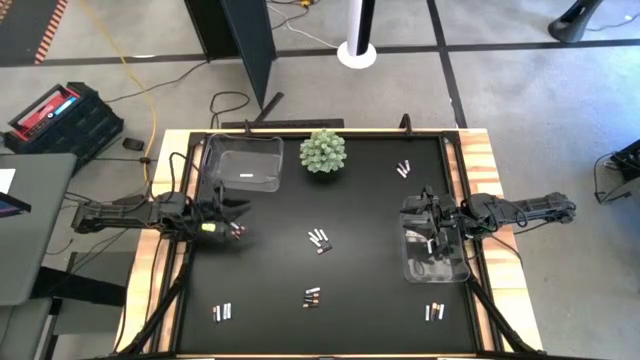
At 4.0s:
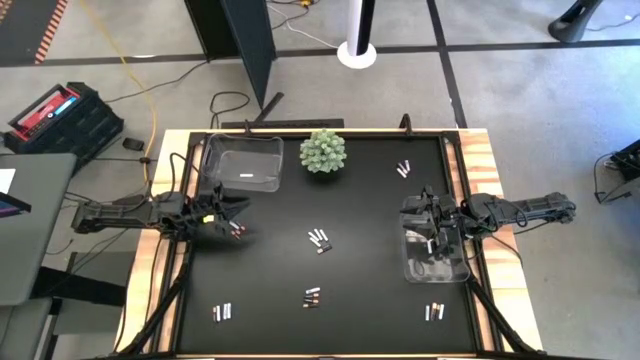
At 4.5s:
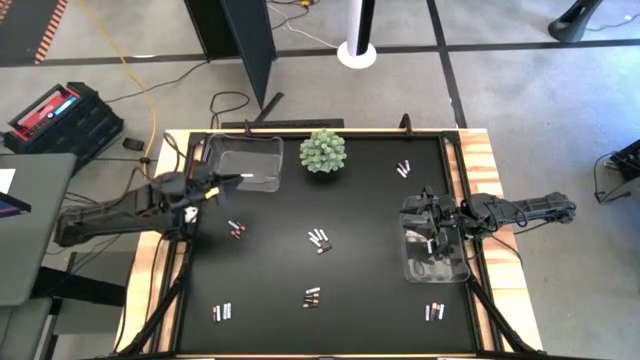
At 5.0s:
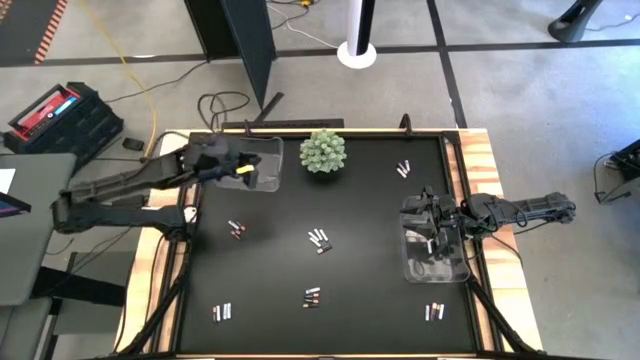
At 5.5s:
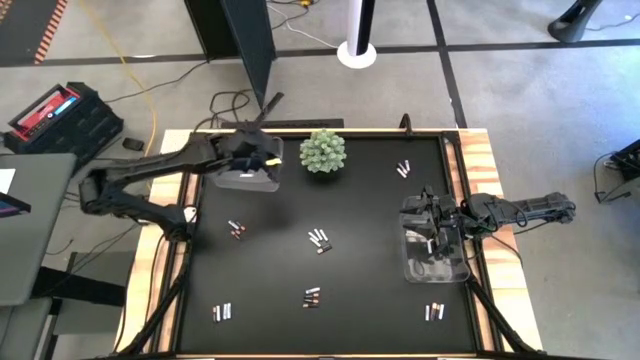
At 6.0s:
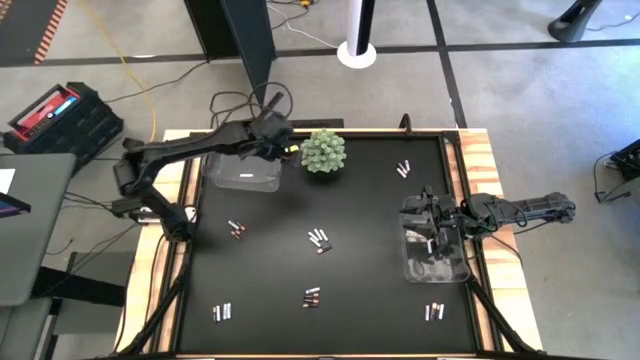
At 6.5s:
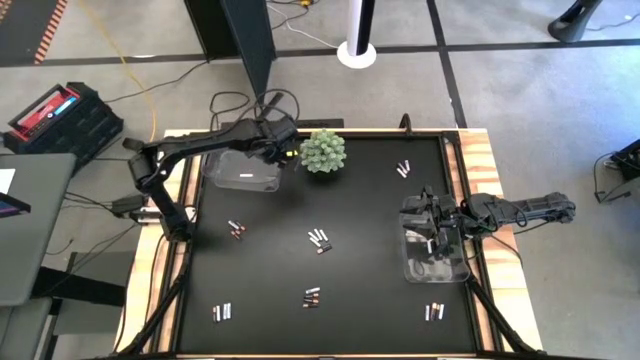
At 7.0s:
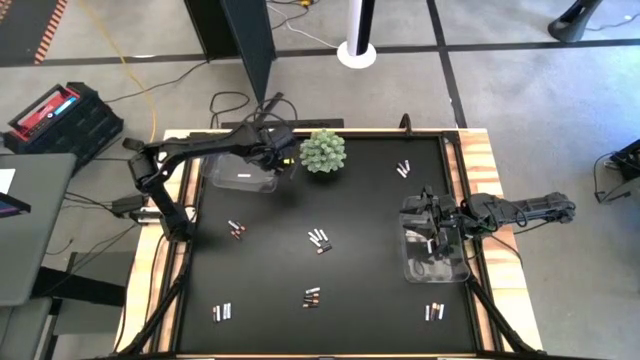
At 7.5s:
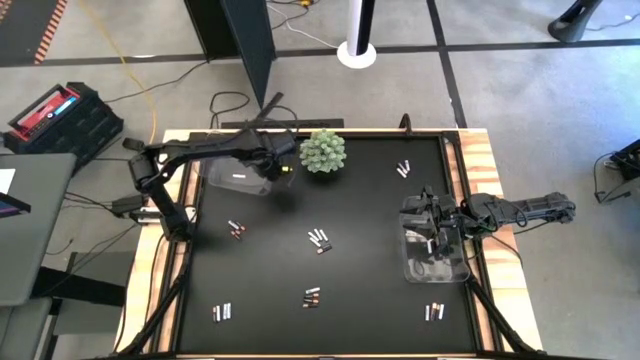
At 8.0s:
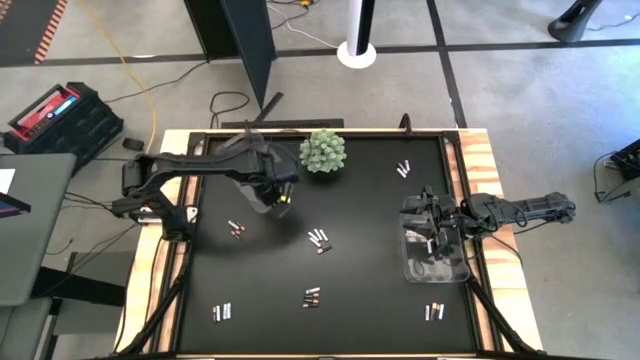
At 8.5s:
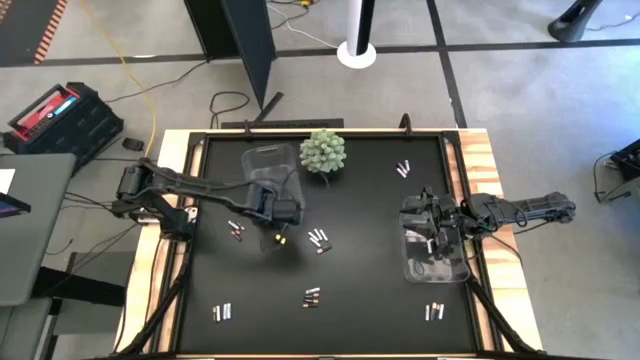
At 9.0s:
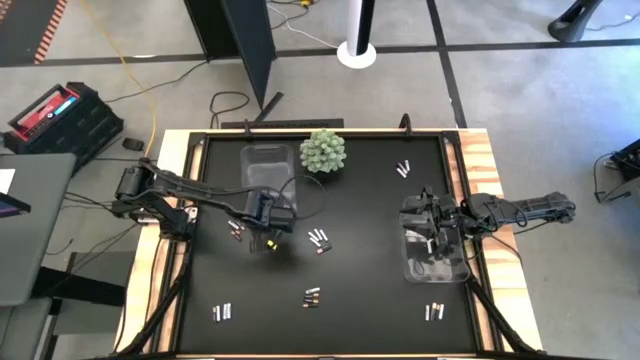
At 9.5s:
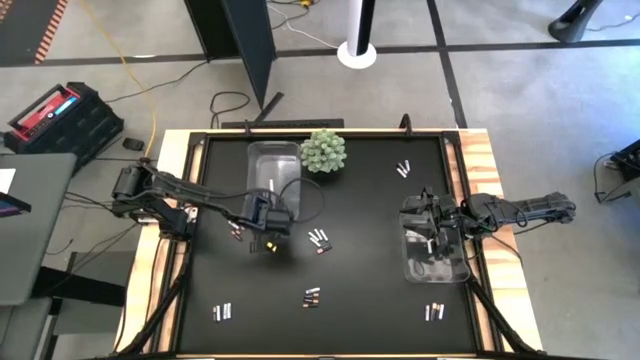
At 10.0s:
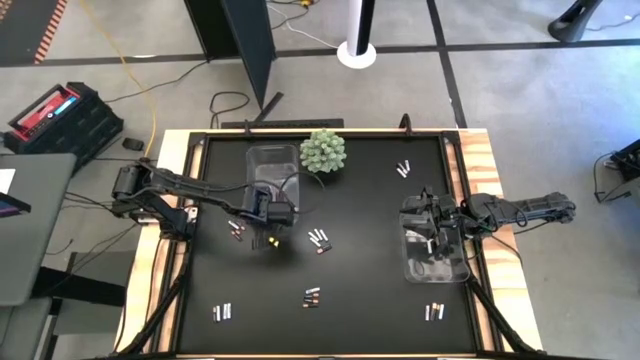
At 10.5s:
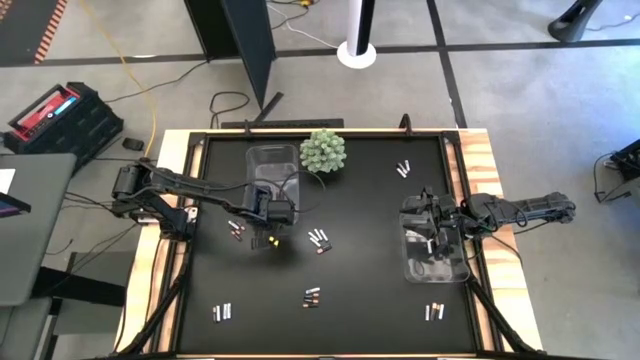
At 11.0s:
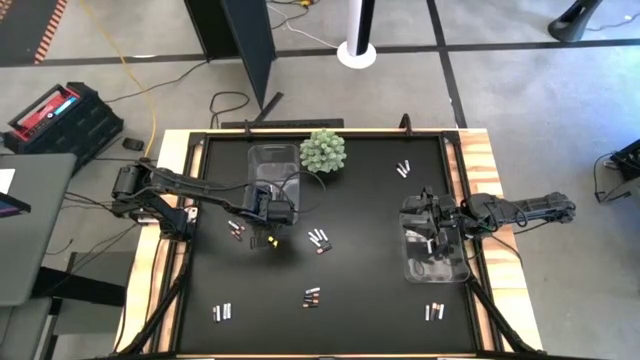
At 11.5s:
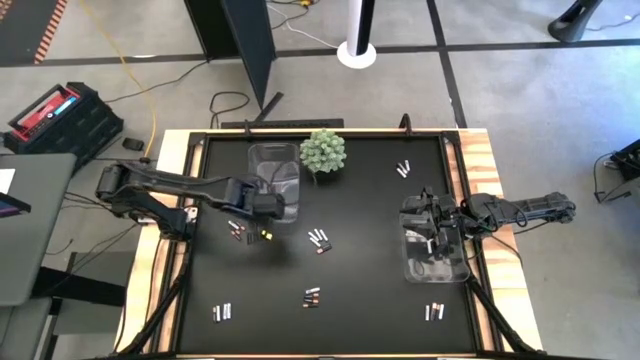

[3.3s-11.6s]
Task: Sort batteries
Prepare the left transparent bin

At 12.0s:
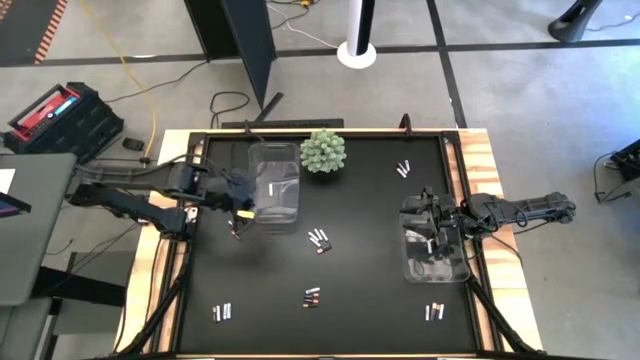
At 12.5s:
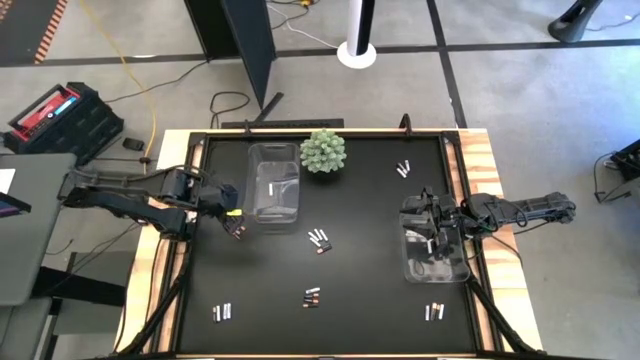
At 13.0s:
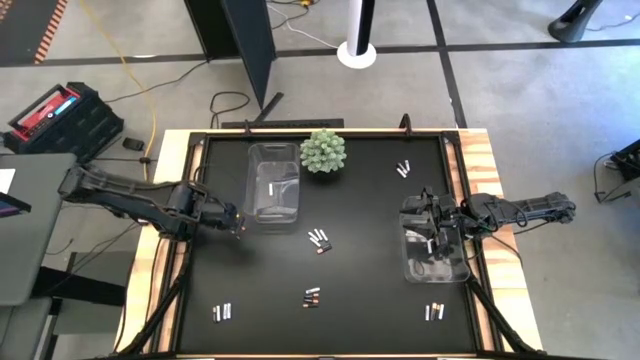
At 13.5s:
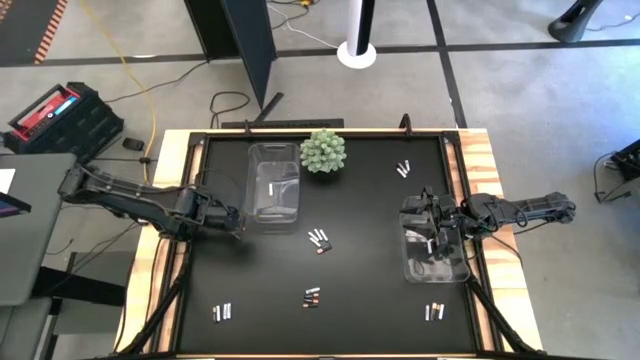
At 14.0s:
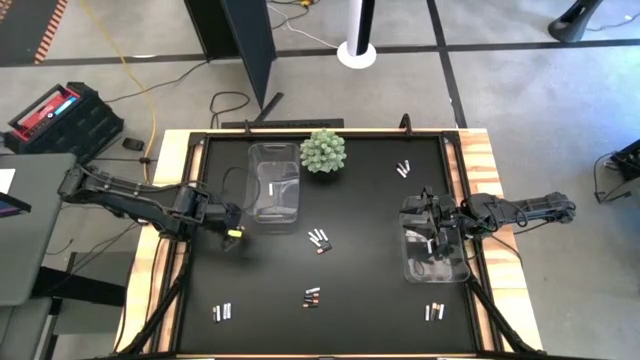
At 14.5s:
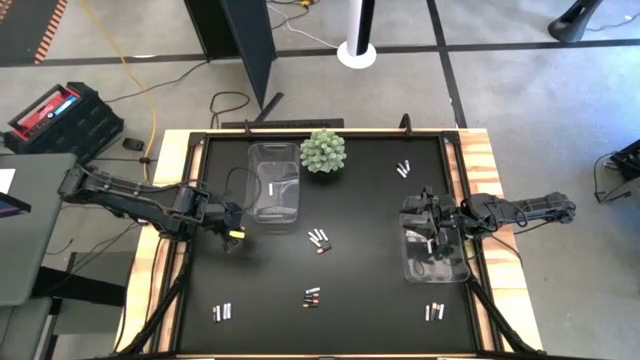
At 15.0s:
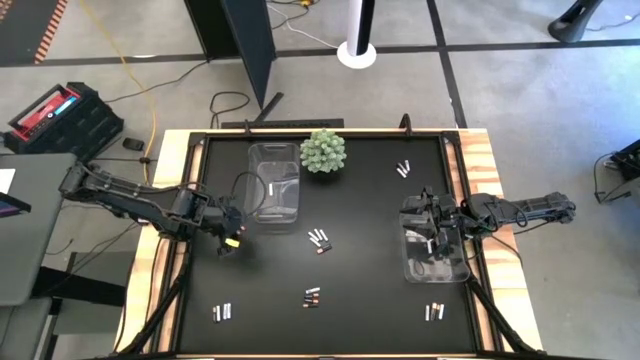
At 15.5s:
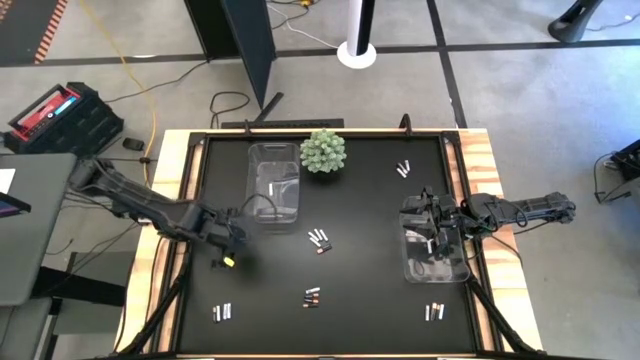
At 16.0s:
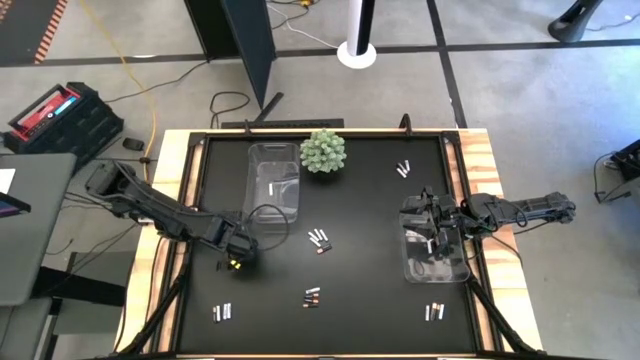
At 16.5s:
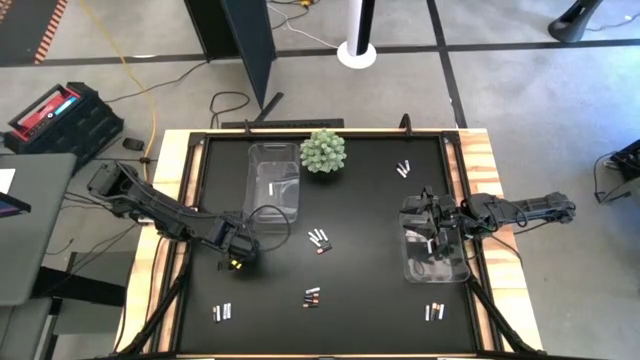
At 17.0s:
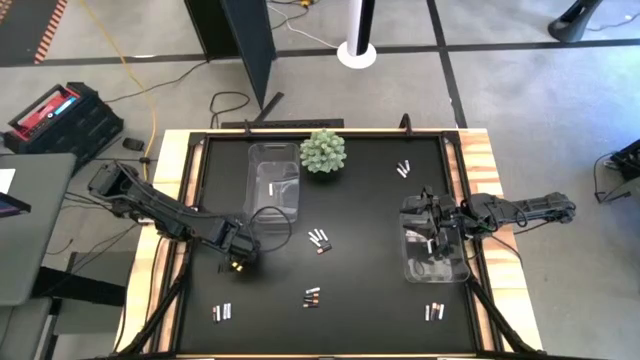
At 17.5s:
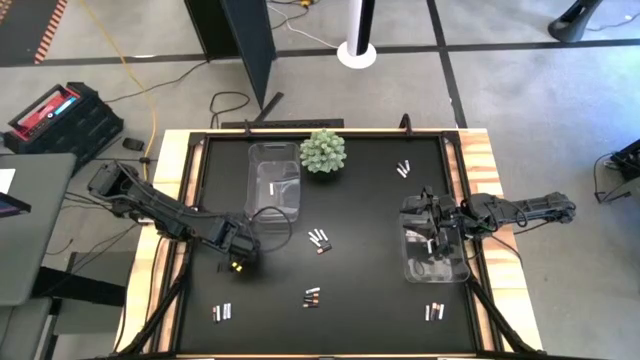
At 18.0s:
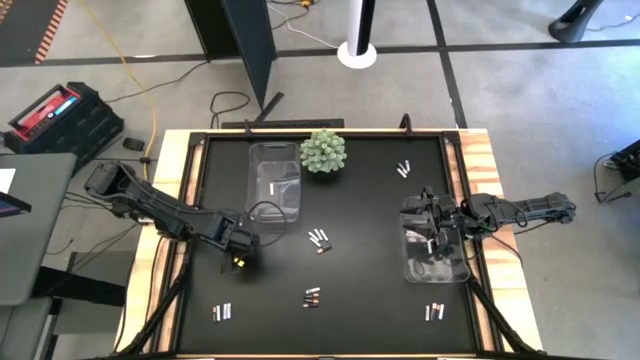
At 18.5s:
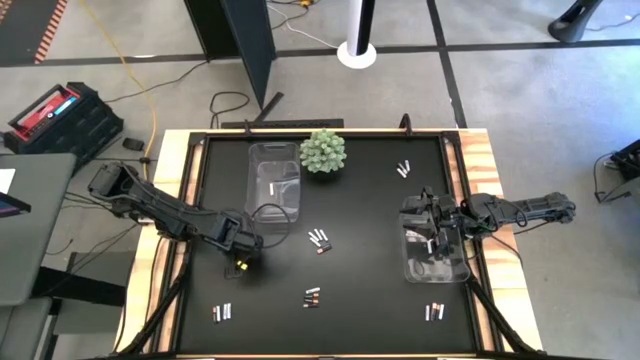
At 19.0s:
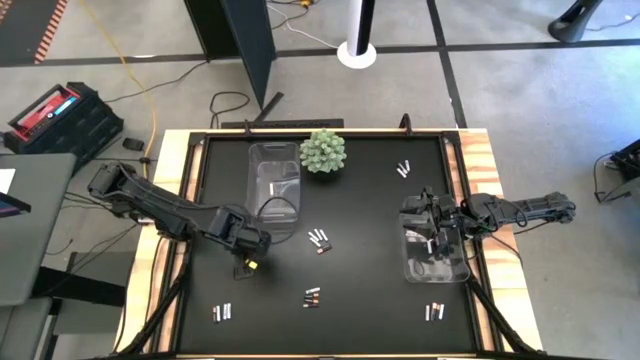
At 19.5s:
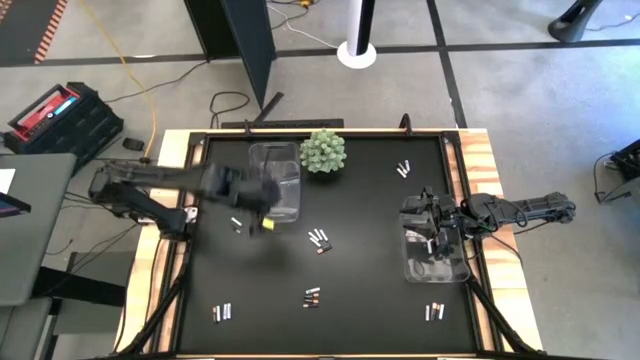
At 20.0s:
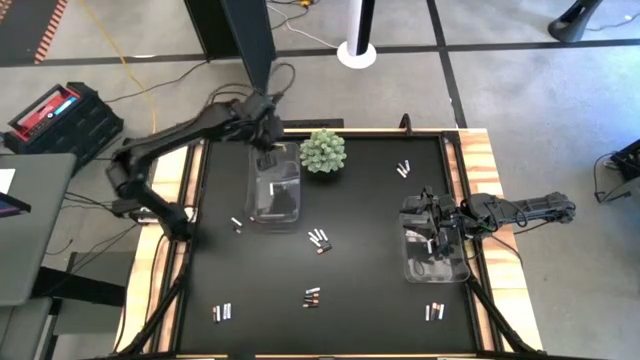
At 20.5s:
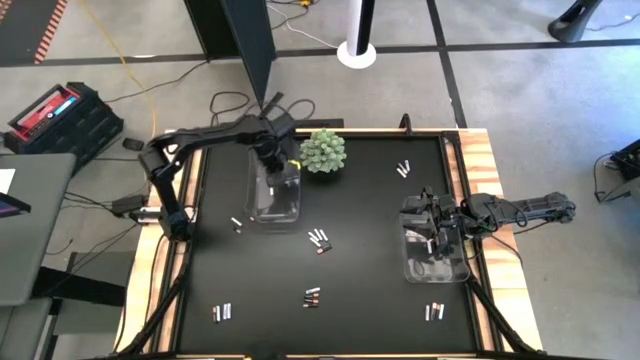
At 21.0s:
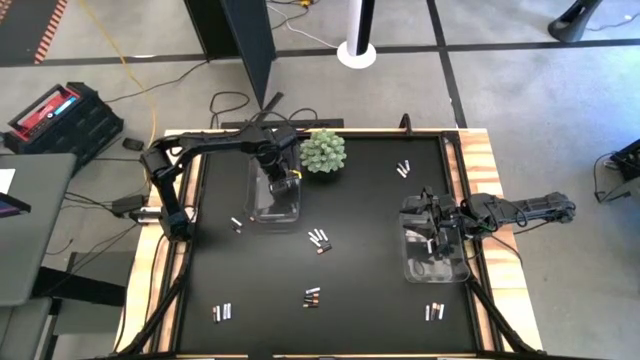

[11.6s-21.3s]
Put the black-brown battery into the left transparent bin

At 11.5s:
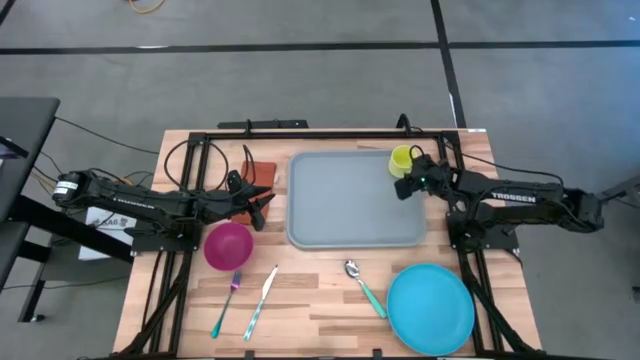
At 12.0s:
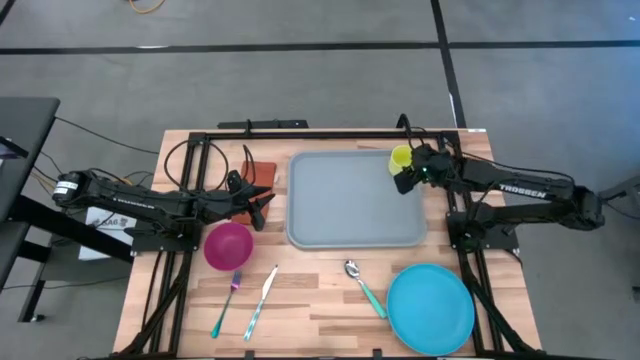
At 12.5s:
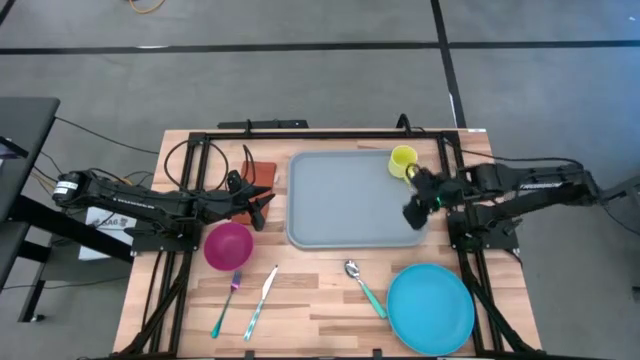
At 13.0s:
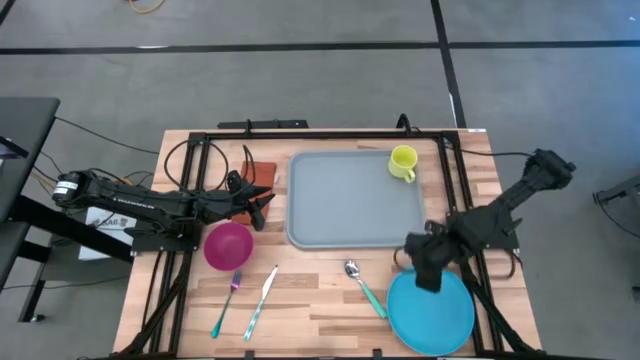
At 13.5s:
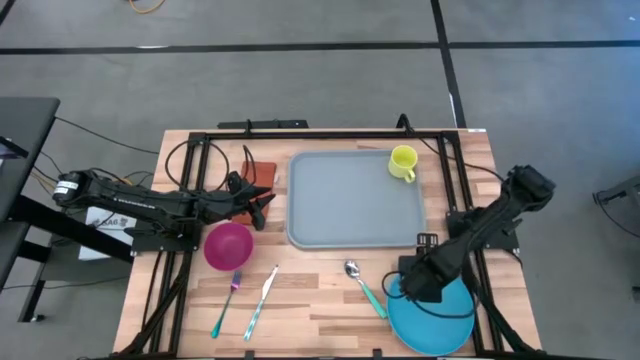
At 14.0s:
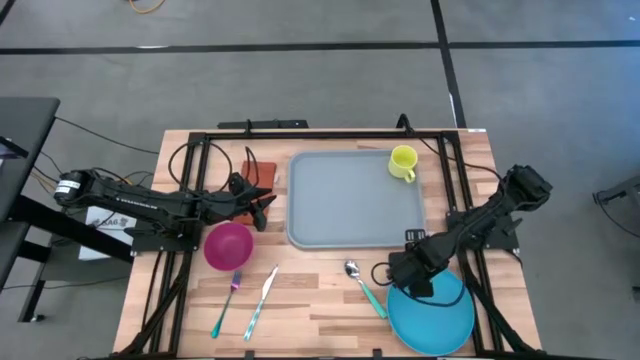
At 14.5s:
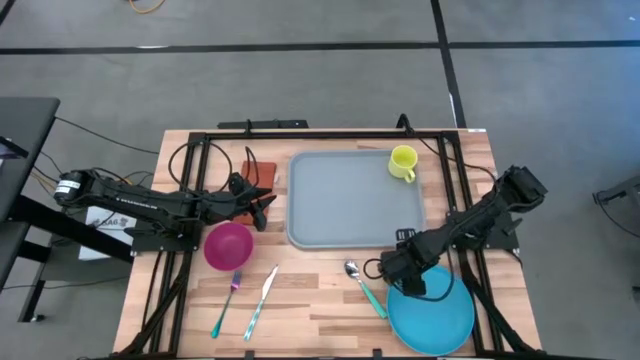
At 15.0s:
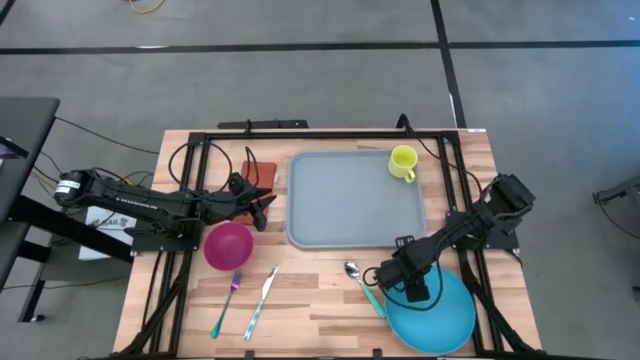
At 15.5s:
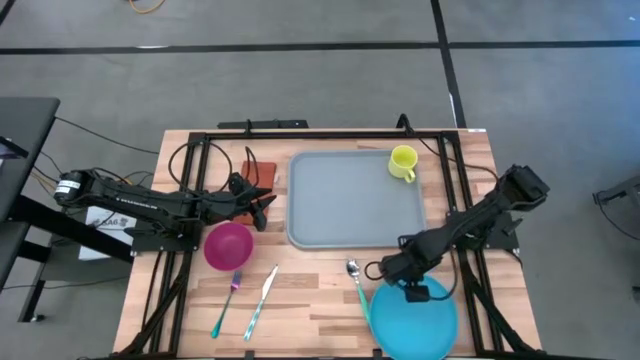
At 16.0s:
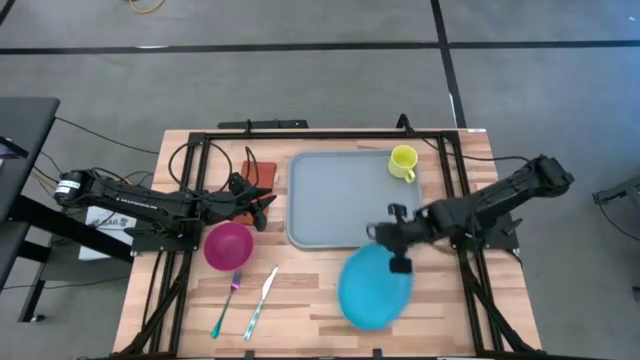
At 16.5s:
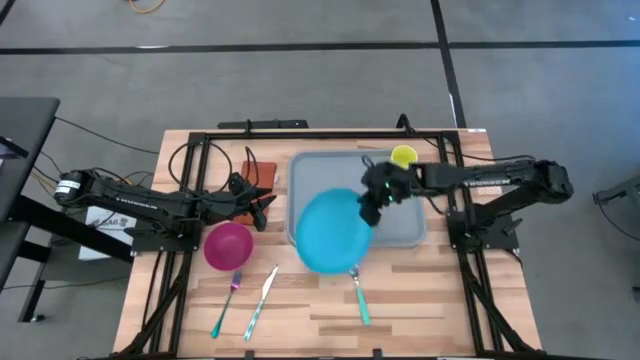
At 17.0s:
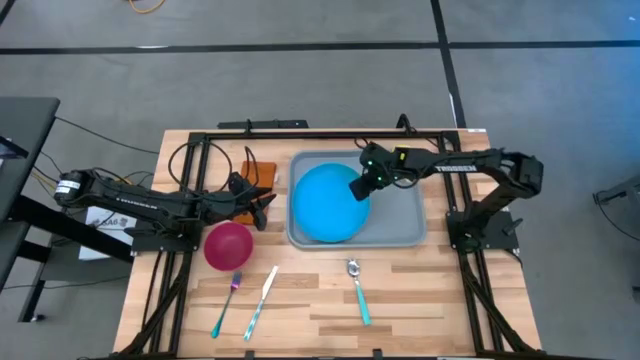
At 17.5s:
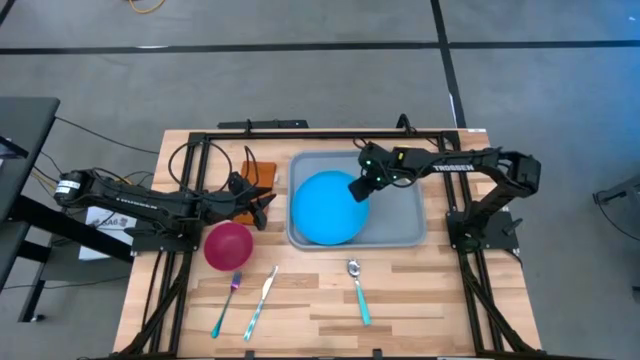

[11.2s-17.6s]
Task: Set up tray
Put the blue plate on top of the gray plate to the bottom left of the yellow mug
